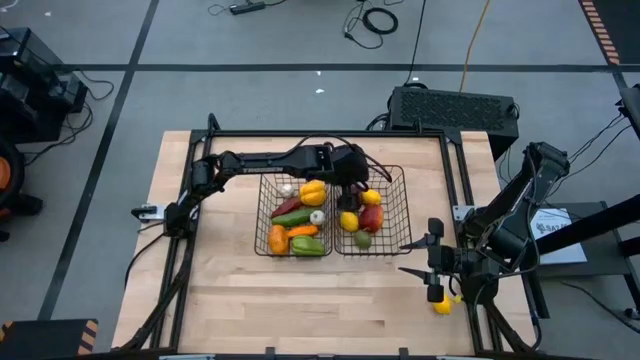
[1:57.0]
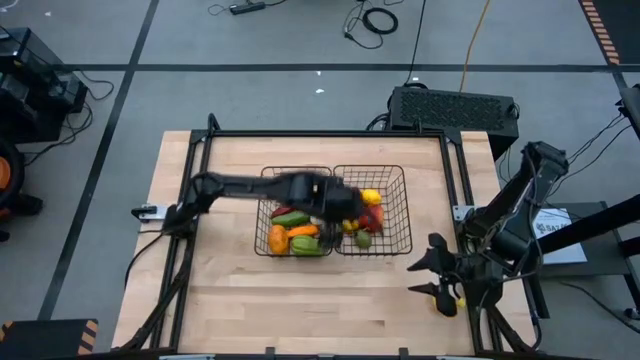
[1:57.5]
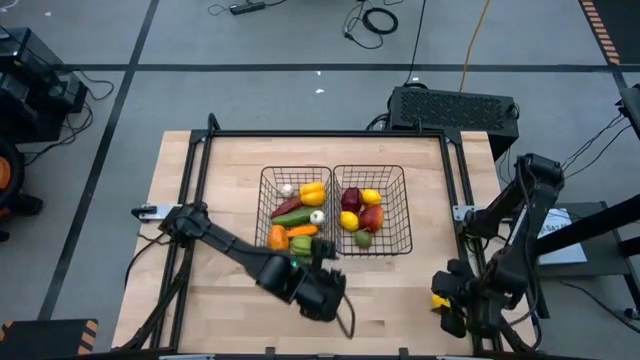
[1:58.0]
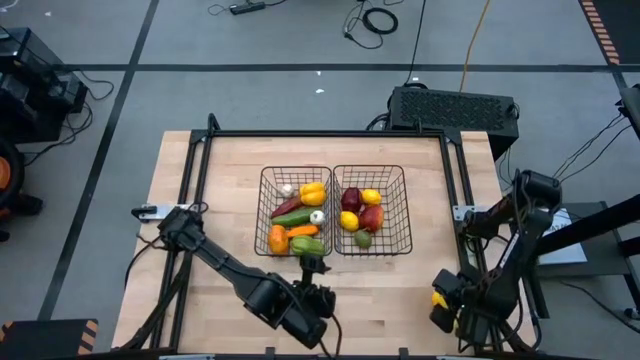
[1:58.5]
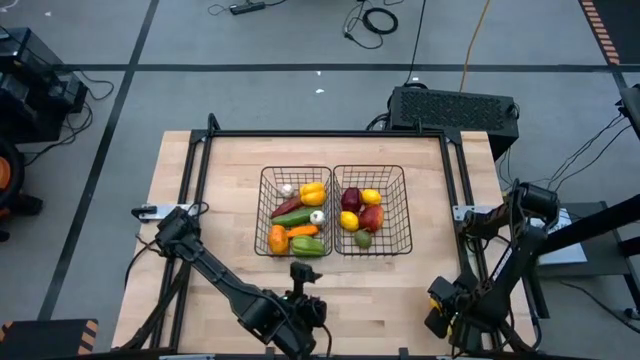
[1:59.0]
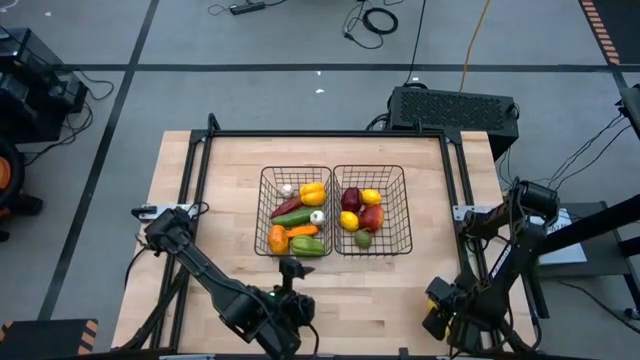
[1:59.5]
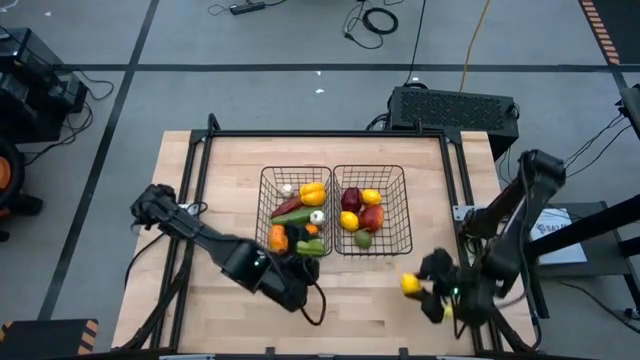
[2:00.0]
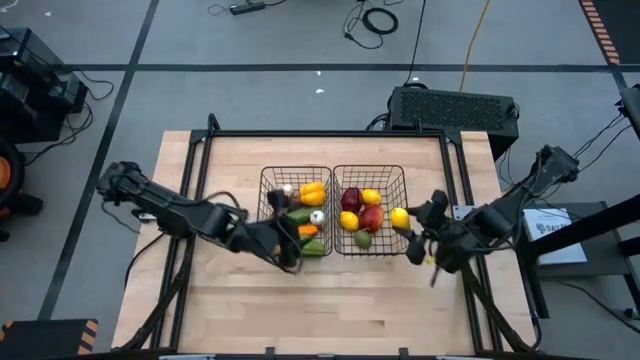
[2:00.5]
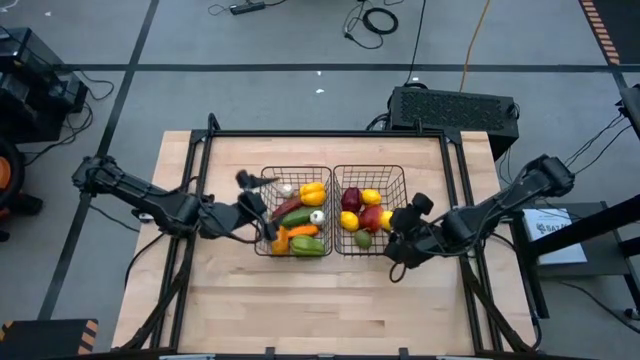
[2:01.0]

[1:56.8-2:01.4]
Task: Sort produce into baskets
Put the yellow lemon into the right black wire basket

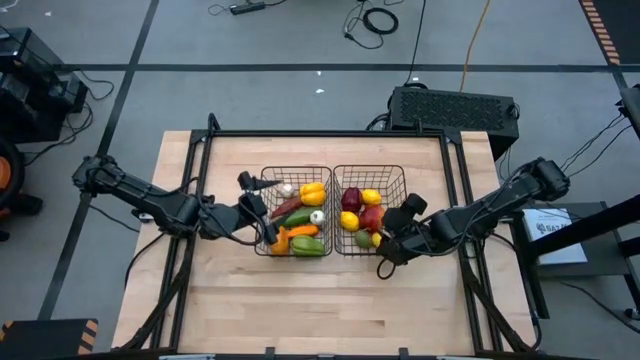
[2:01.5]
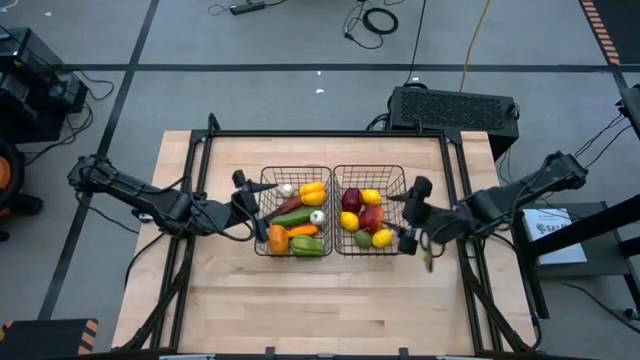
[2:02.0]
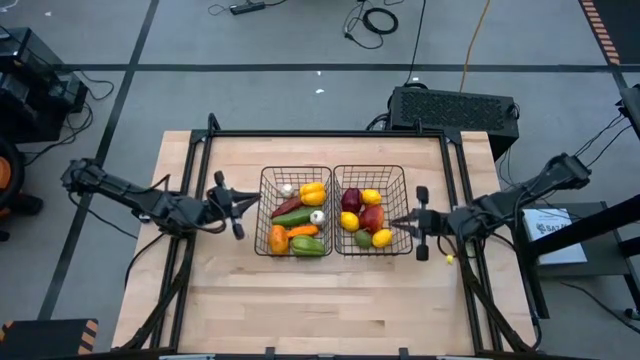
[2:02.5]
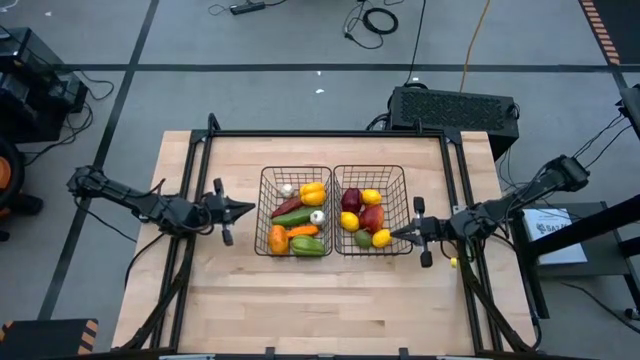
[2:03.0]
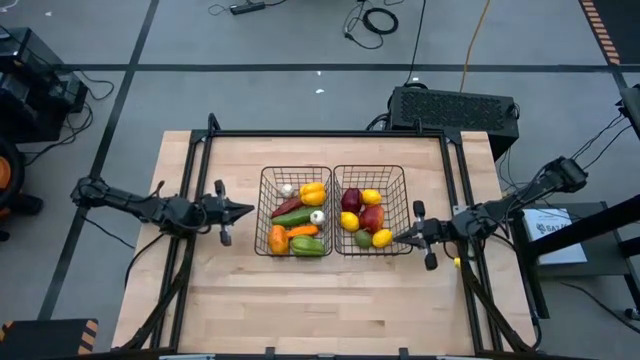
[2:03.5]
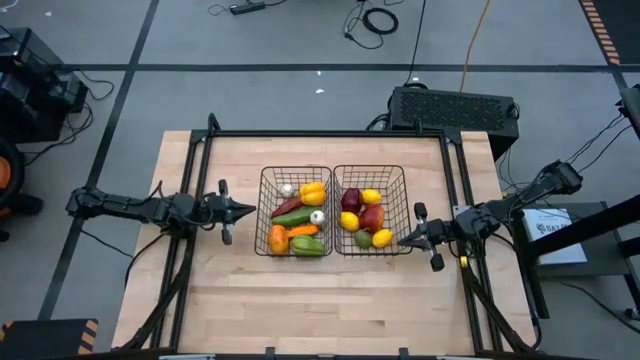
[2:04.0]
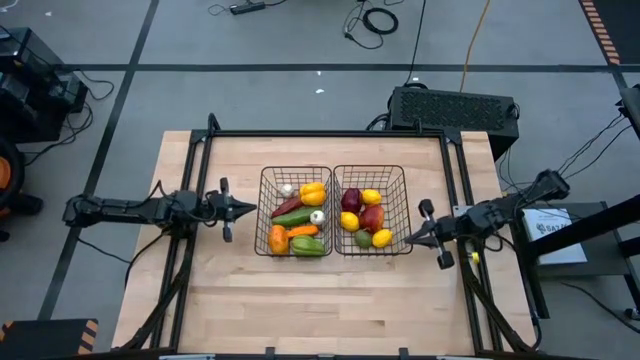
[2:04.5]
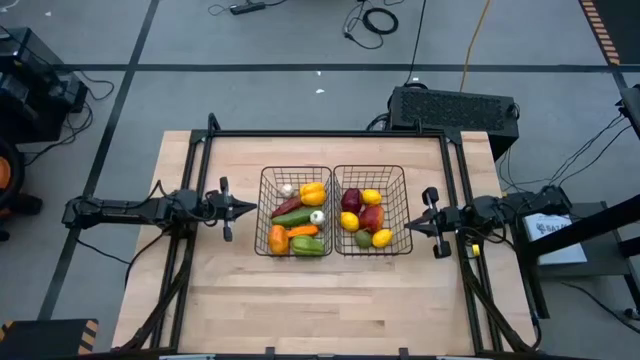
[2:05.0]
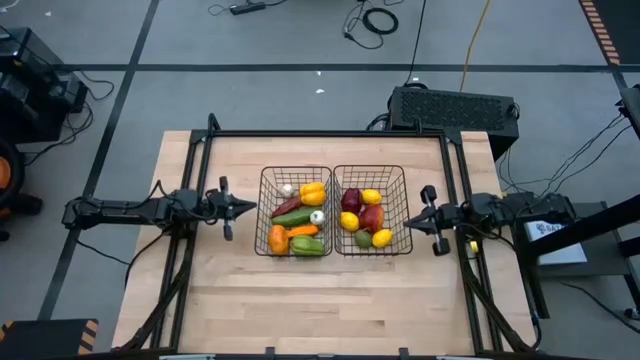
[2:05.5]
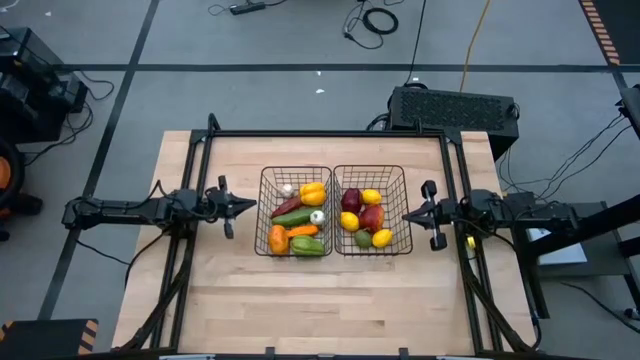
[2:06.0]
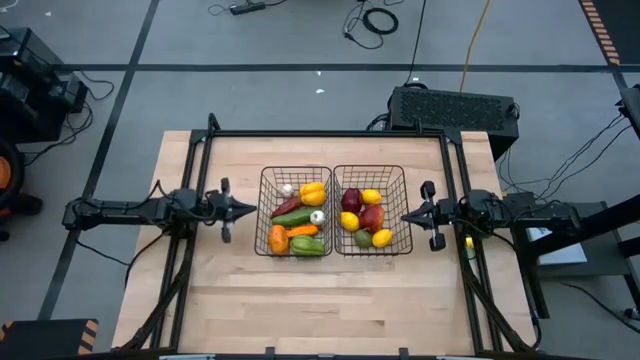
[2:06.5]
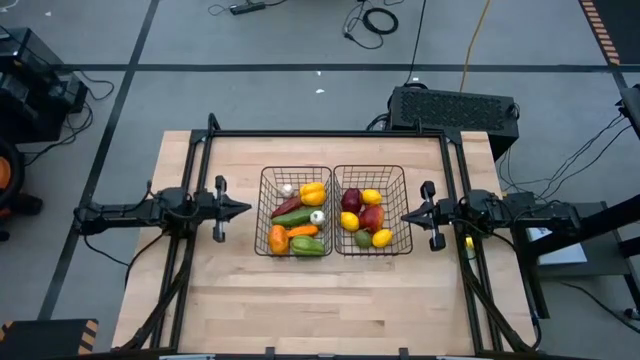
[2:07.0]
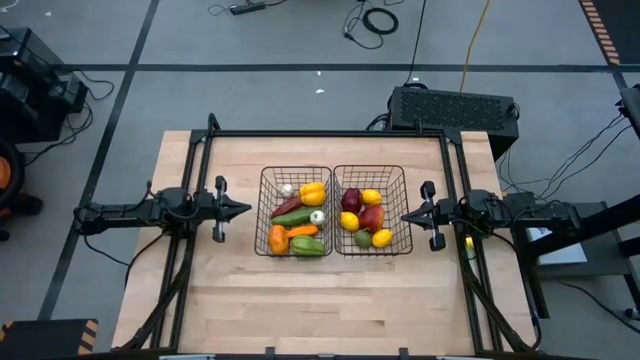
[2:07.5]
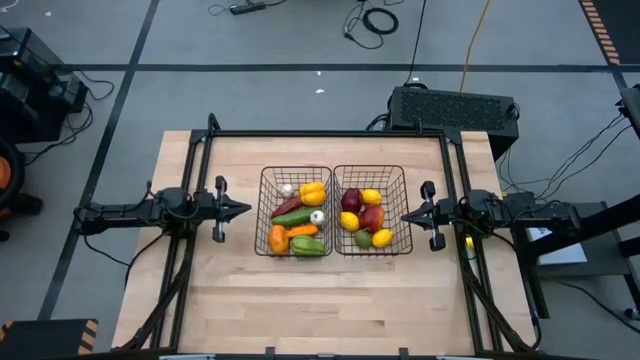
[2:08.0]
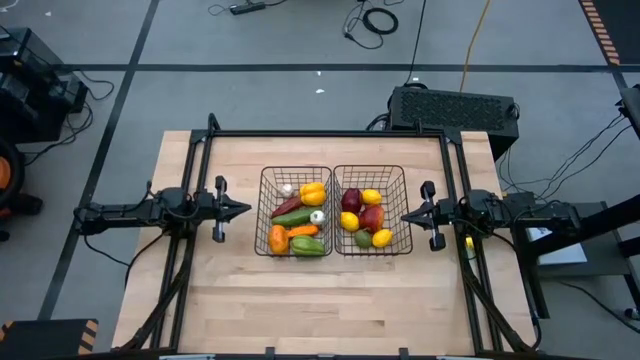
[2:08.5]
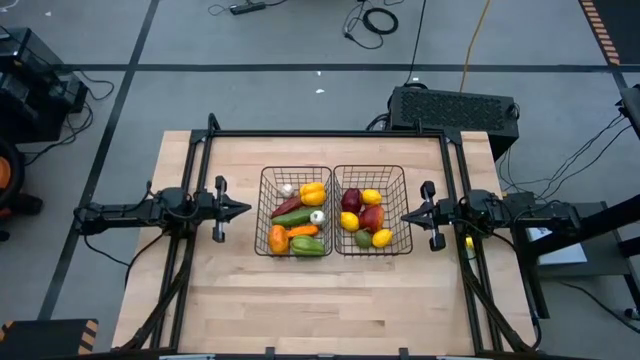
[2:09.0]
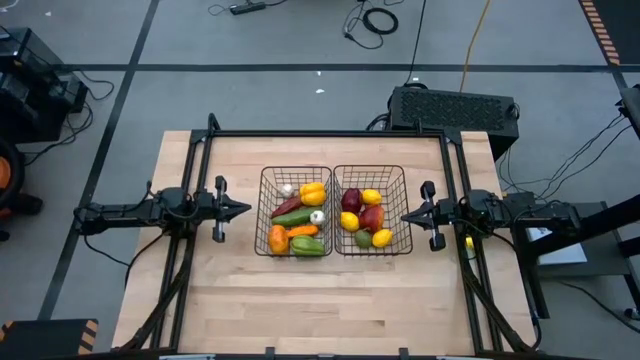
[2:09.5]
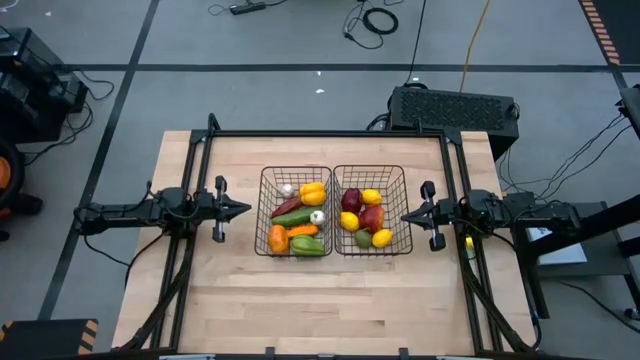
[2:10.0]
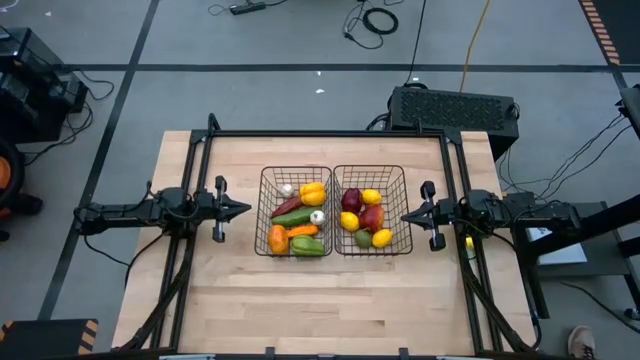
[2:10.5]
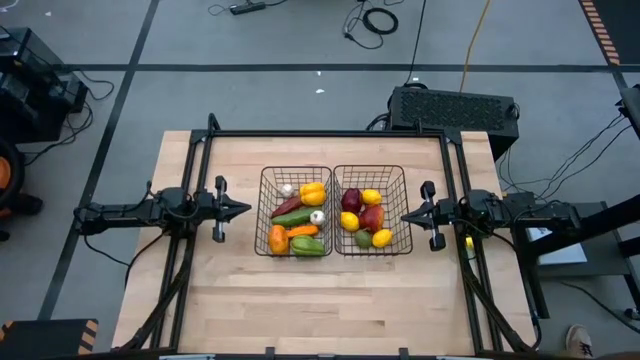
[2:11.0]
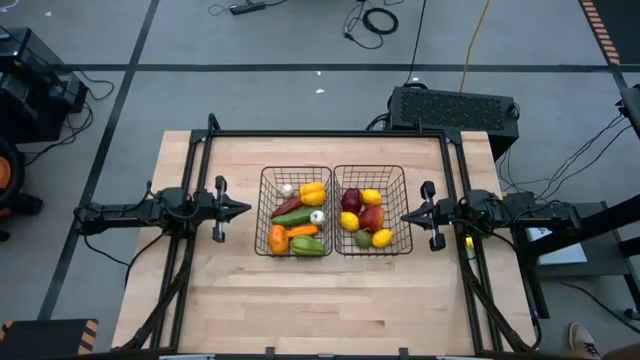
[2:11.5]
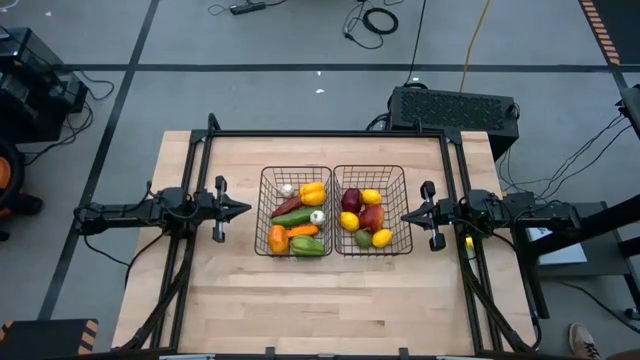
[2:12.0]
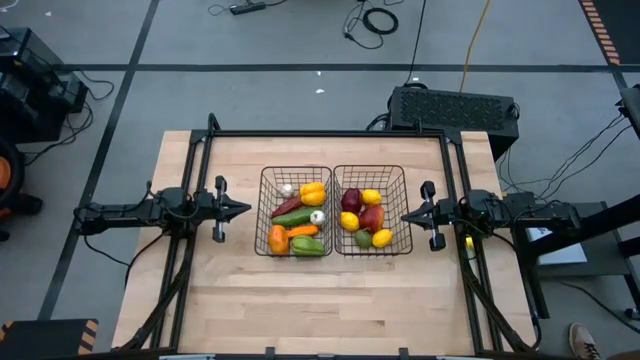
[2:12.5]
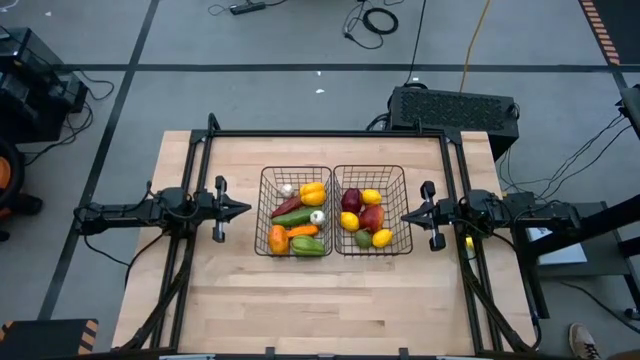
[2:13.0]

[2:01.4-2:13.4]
Return to Home Position

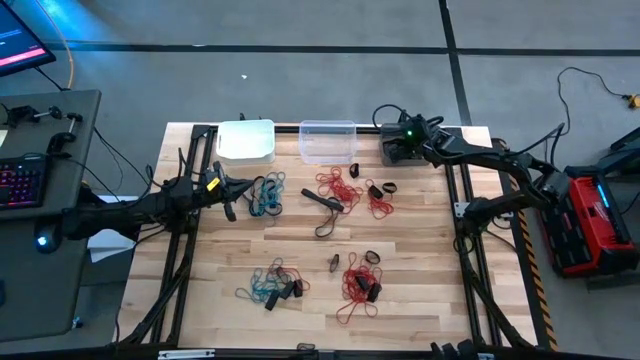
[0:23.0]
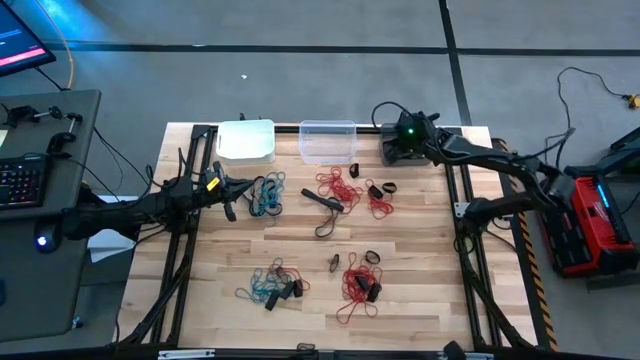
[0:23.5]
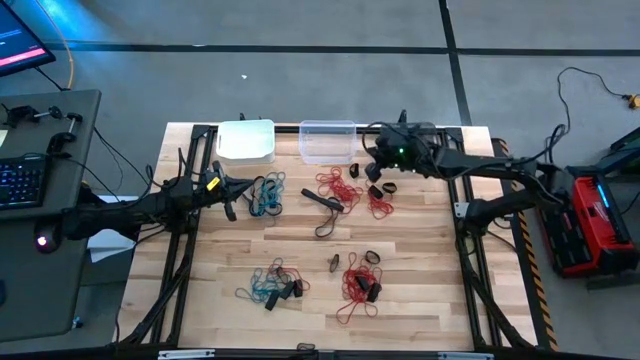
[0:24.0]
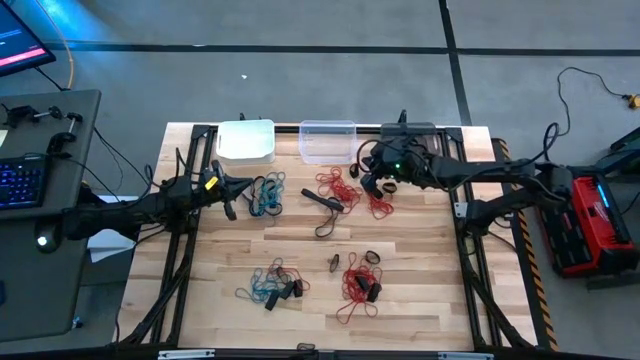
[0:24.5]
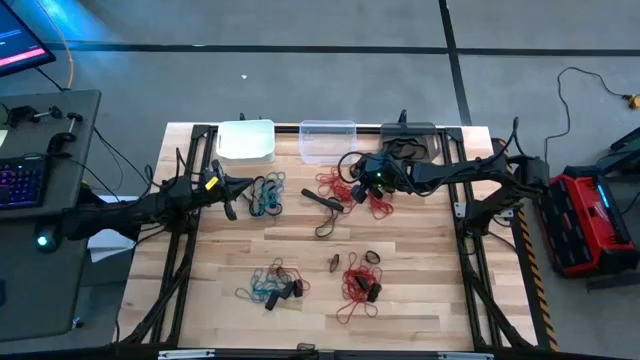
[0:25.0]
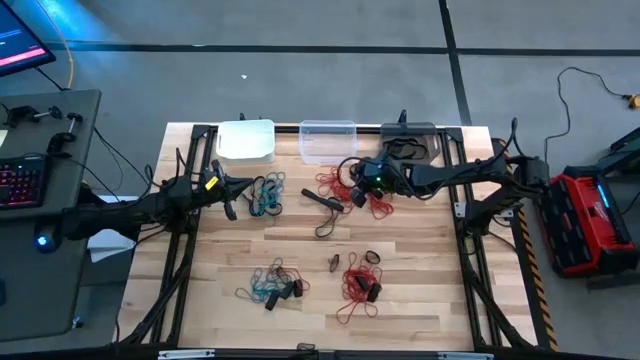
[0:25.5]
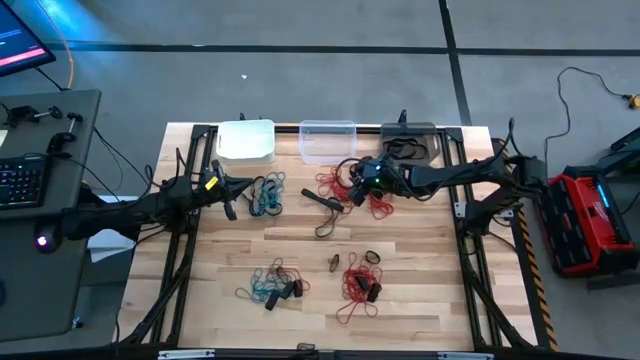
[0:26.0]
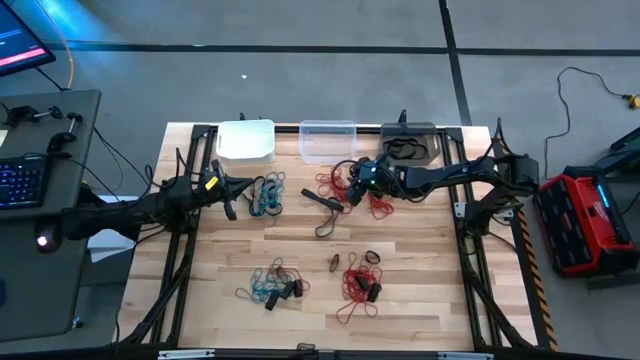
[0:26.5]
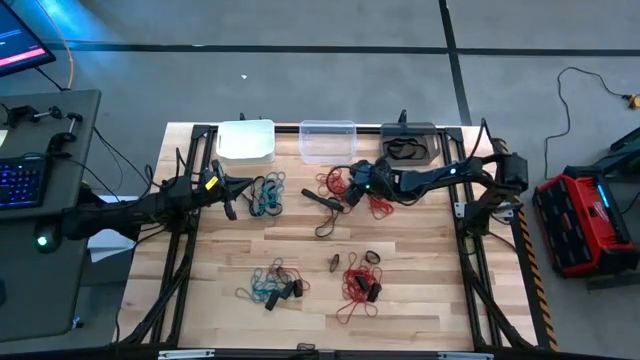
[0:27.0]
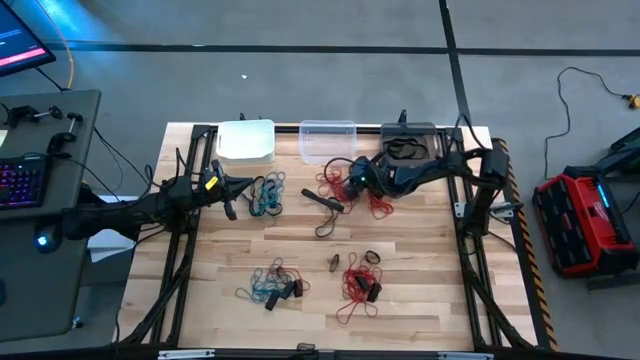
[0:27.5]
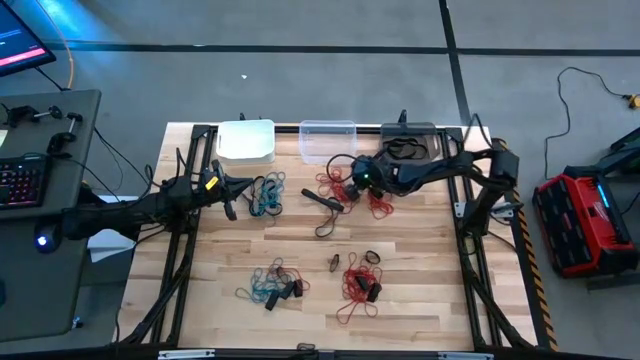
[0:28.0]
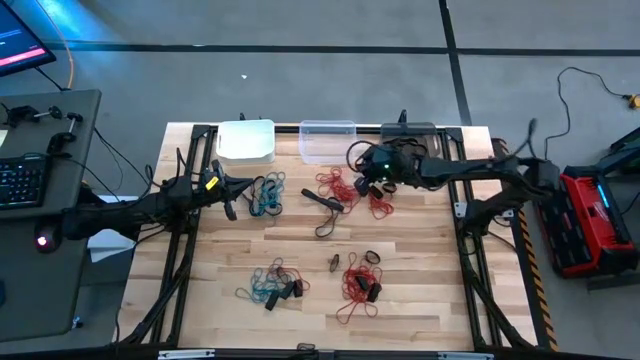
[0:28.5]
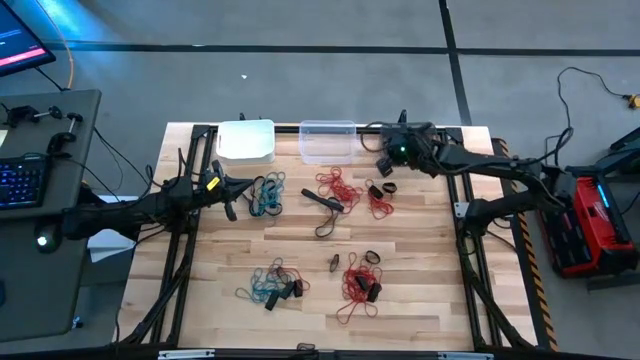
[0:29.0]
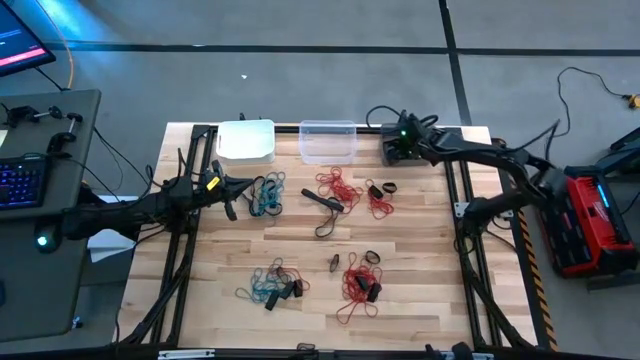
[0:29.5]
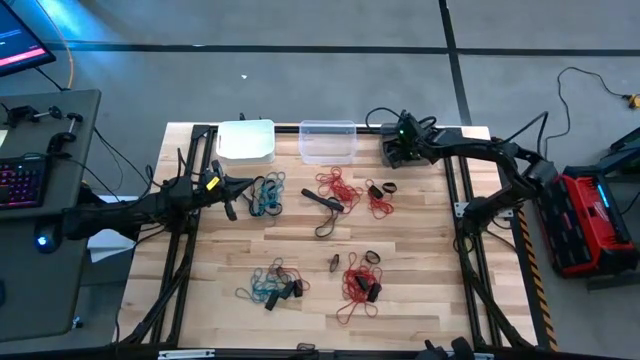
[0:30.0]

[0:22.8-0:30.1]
Task: Sort rubber bands into baskets
Put the black rubber band into the black bin
